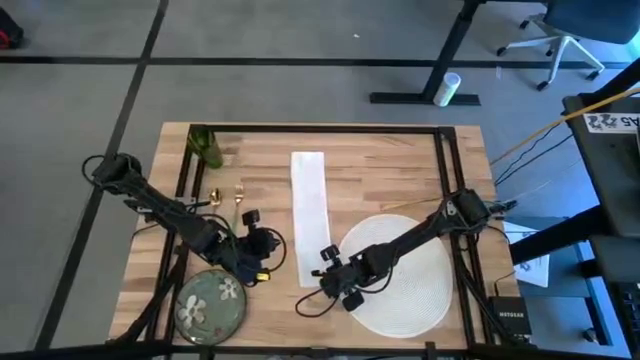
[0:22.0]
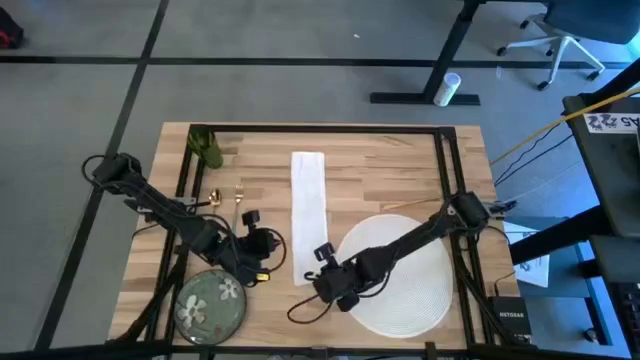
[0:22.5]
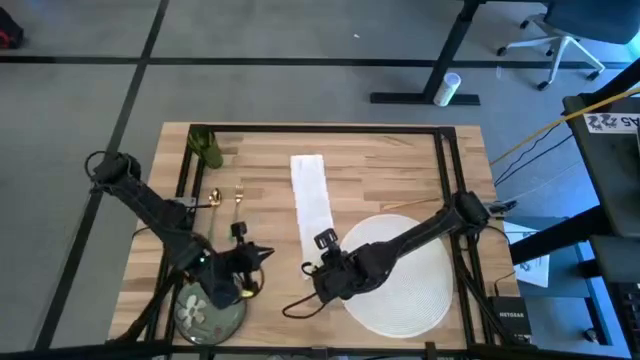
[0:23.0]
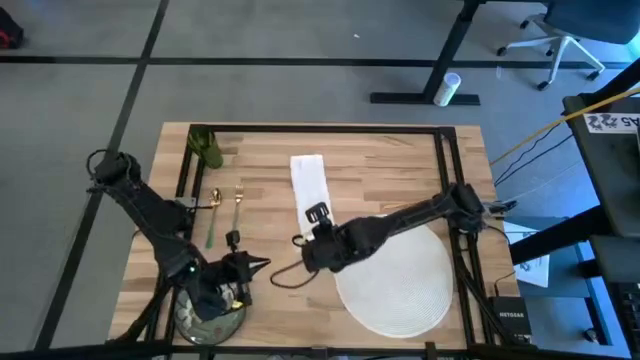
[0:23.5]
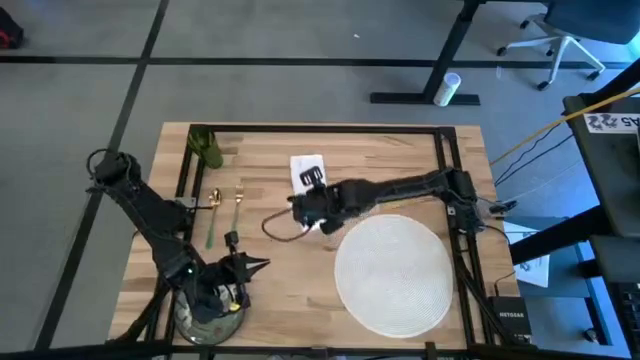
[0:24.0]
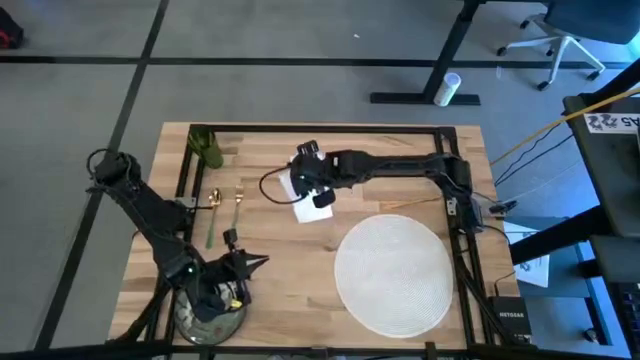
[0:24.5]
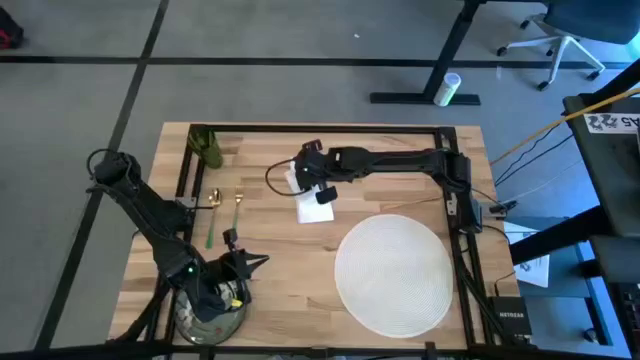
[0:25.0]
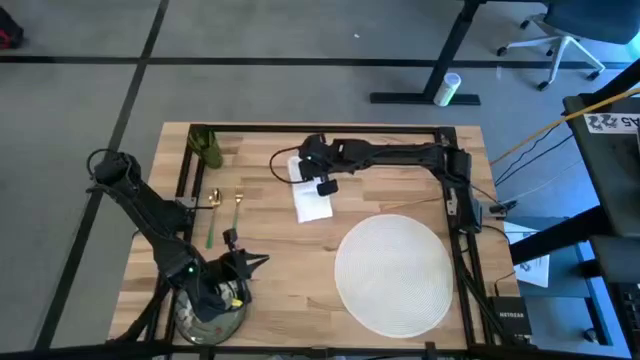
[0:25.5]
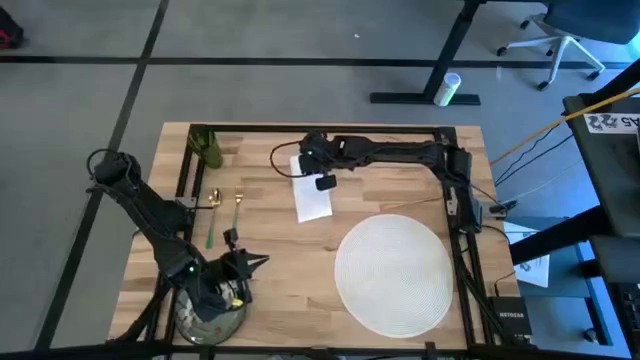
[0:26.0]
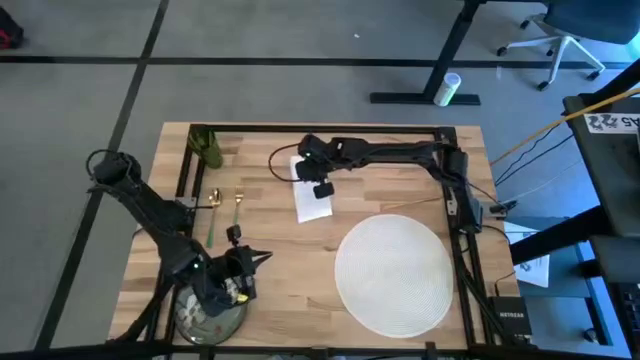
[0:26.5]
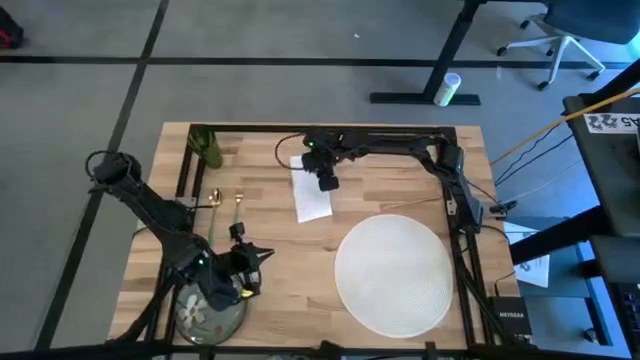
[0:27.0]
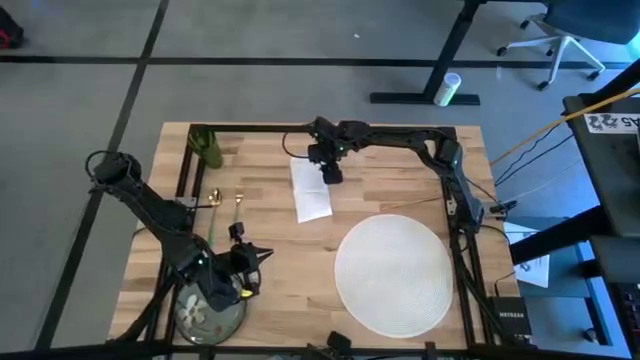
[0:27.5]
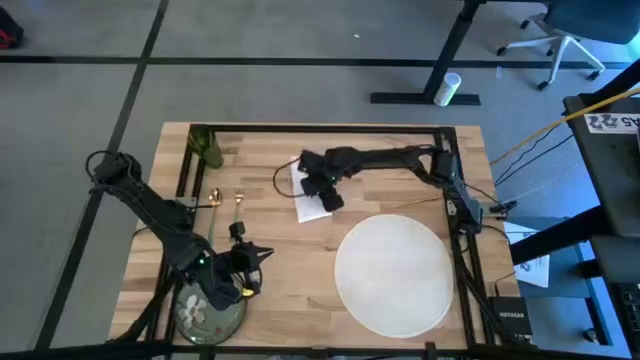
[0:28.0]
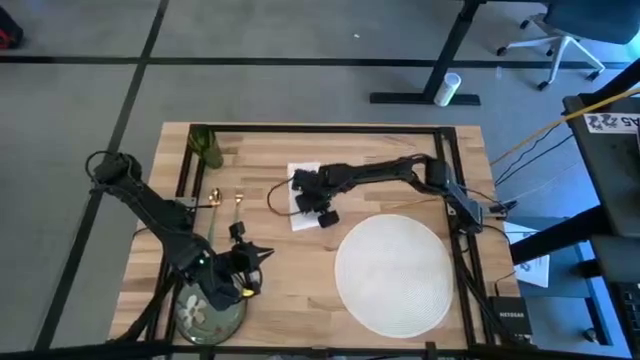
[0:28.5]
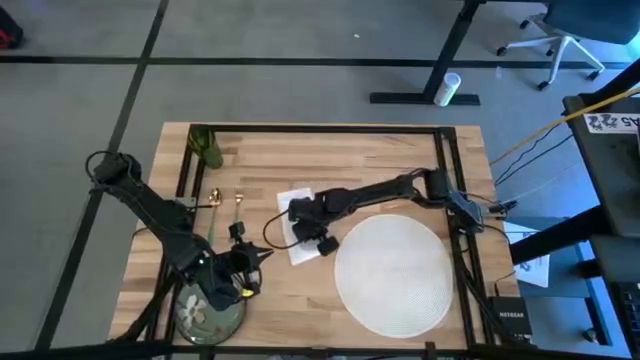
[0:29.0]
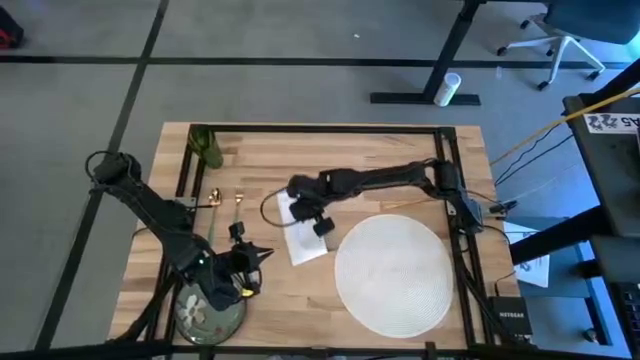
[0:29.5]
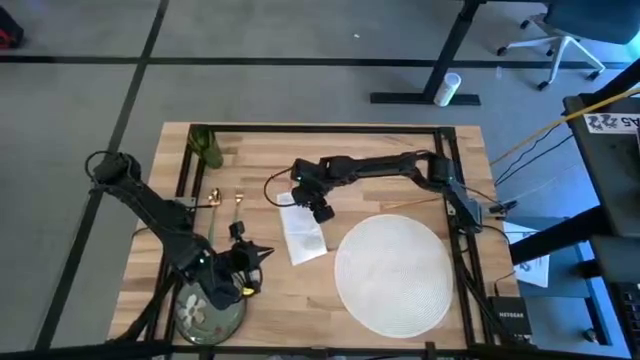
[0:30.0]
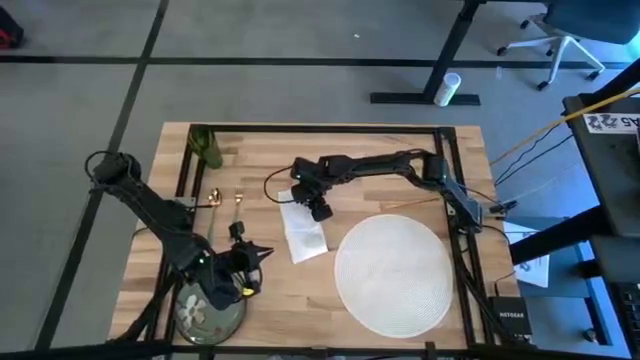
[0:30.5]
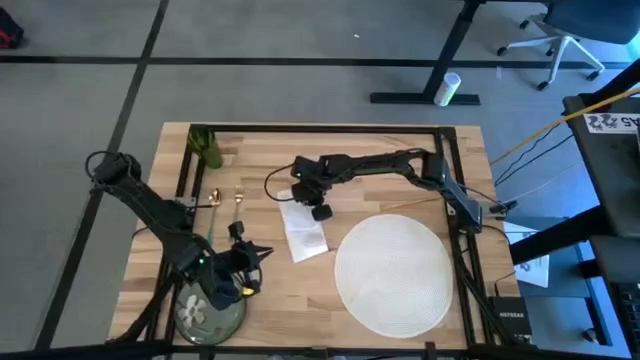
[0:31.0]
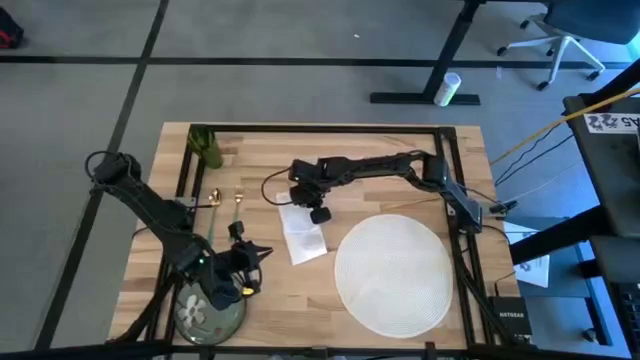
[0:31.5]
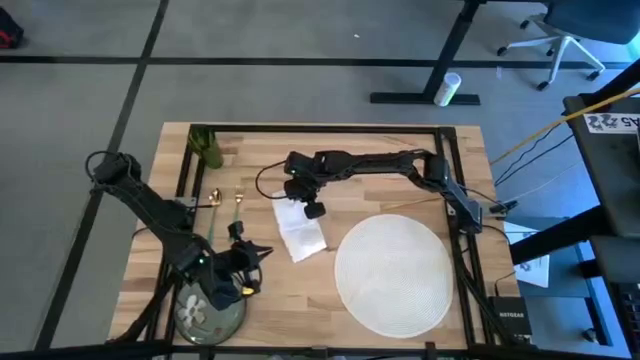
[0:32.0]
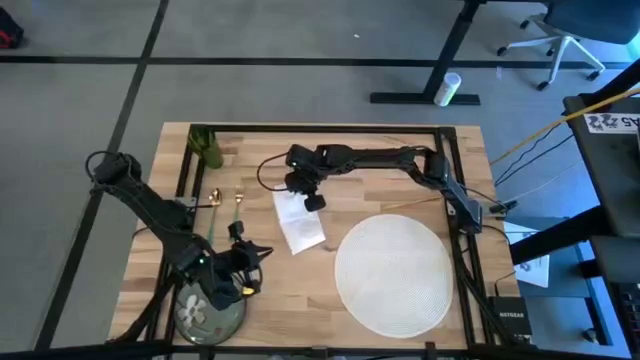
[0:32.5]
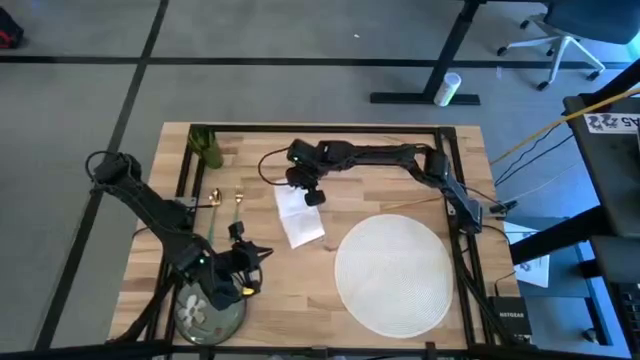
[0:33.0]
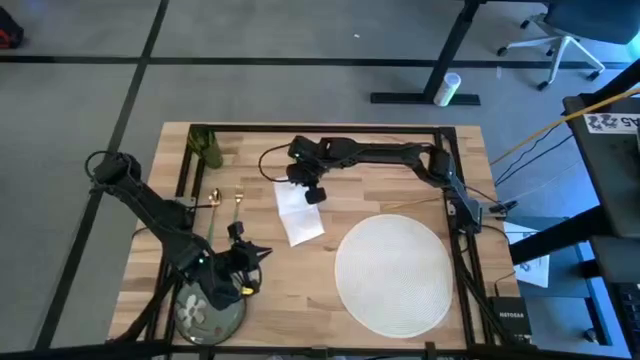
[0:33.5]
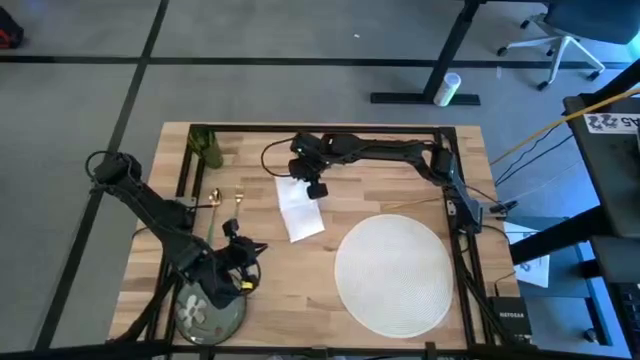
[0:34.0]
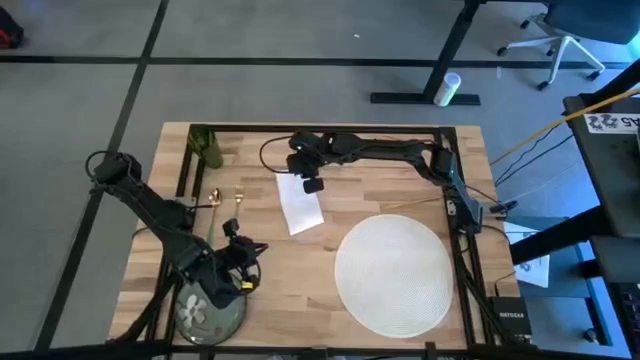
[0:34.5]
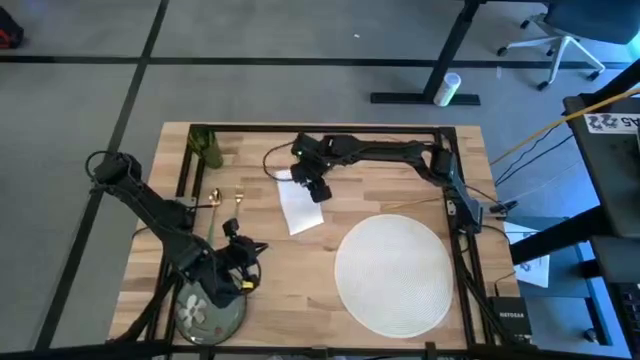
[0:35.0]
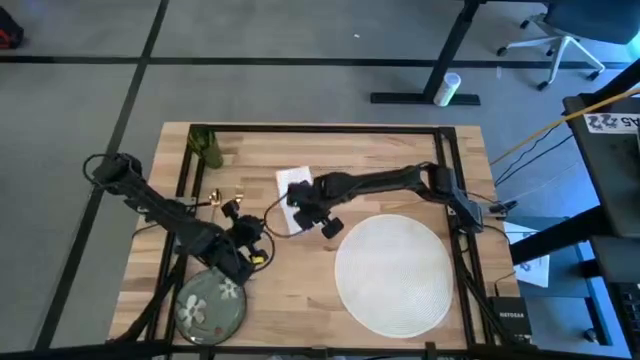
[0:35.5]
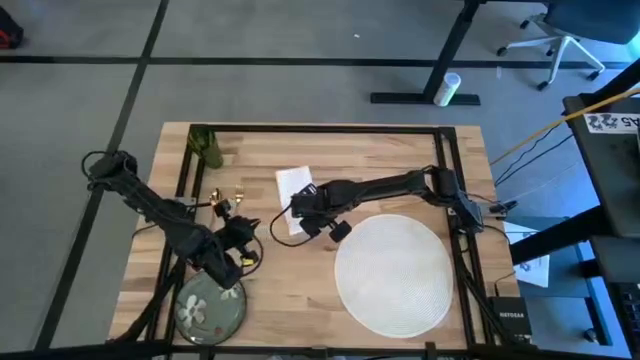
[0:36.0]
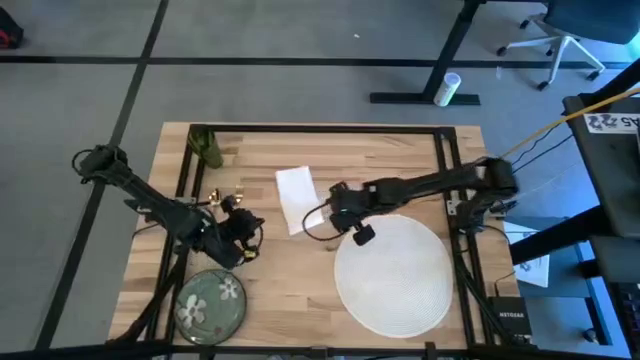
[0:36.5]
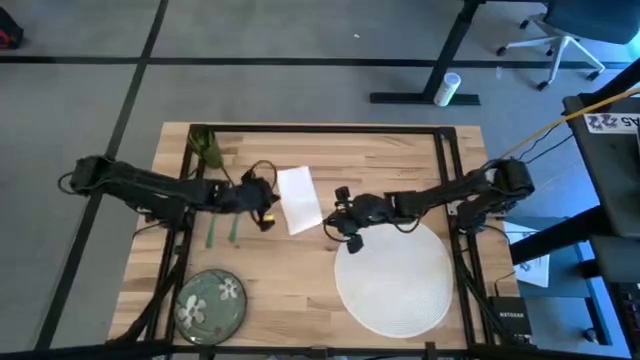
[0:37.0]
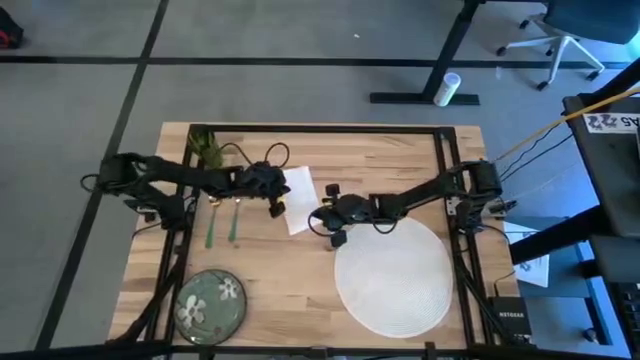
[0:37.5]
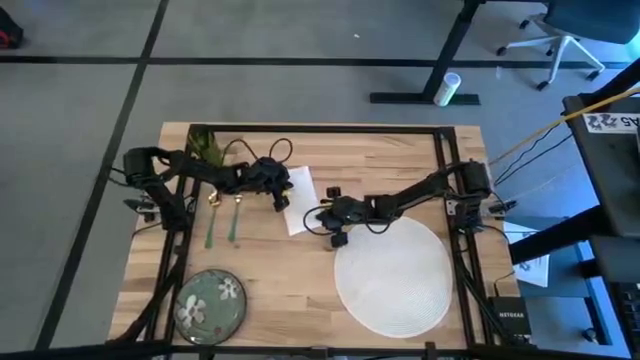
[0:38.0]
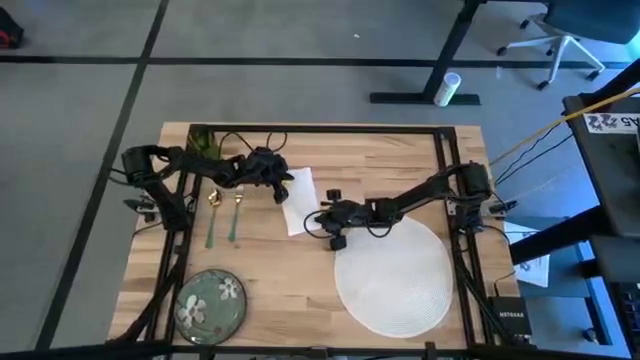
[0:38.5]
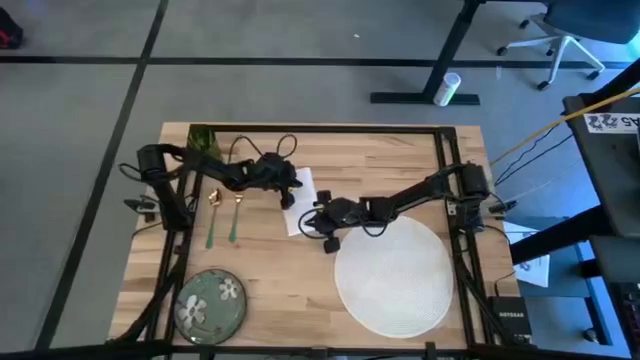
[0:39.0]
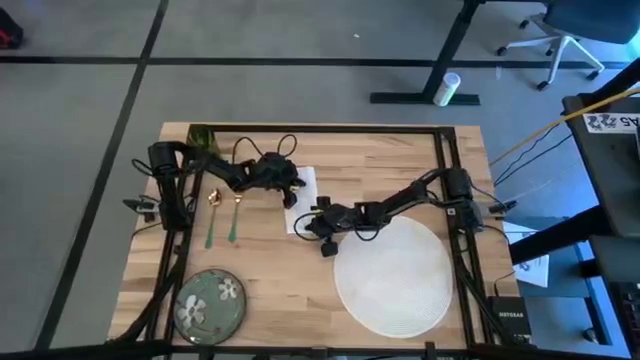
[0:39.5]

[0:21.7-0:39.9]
Task: Set table place
Fold the white table napkin
